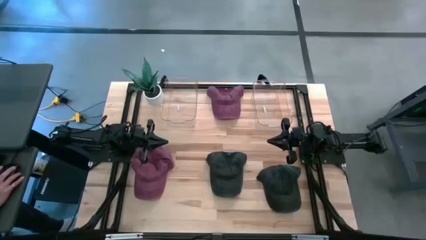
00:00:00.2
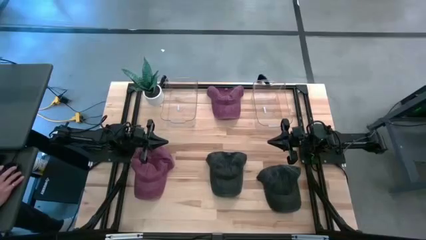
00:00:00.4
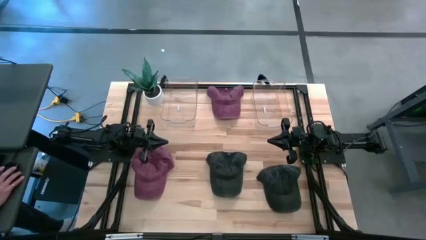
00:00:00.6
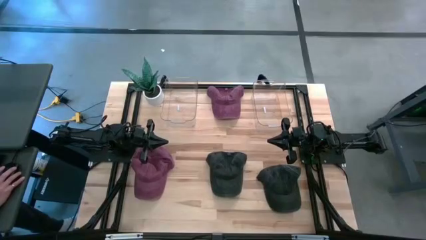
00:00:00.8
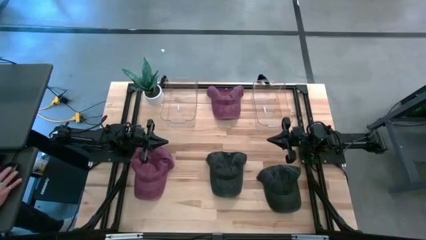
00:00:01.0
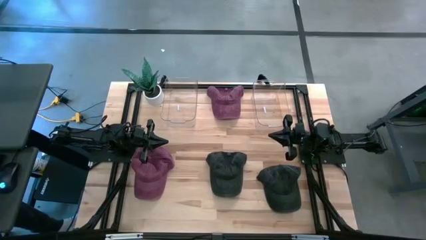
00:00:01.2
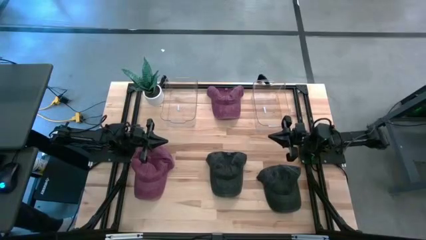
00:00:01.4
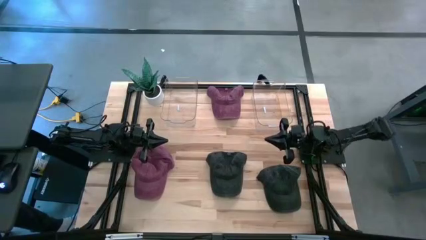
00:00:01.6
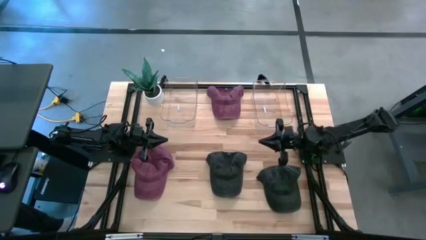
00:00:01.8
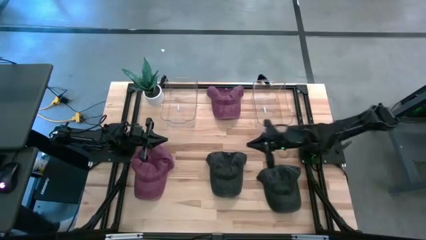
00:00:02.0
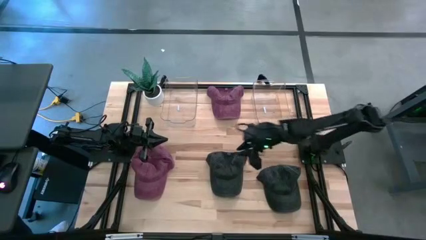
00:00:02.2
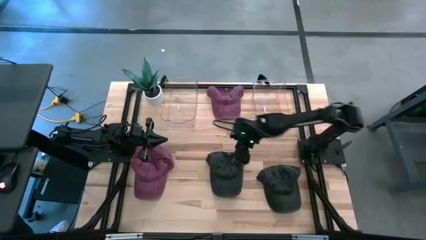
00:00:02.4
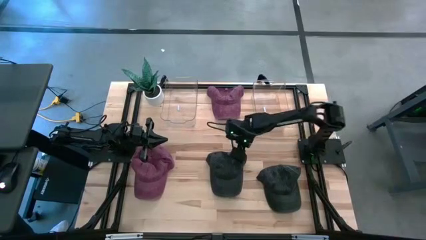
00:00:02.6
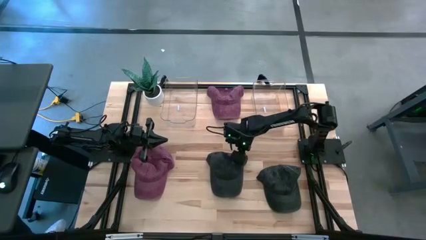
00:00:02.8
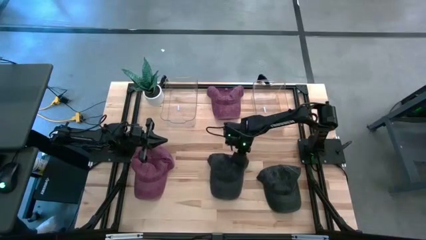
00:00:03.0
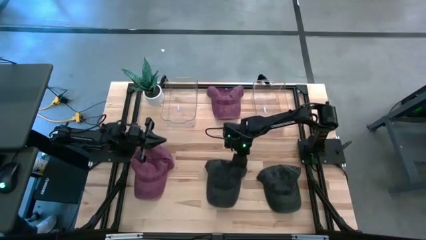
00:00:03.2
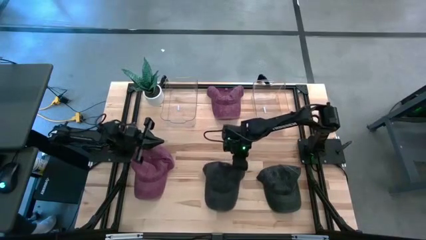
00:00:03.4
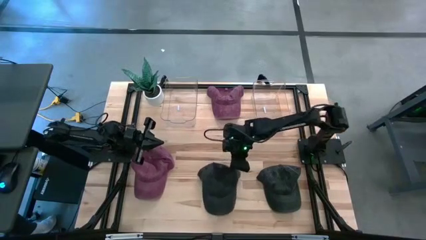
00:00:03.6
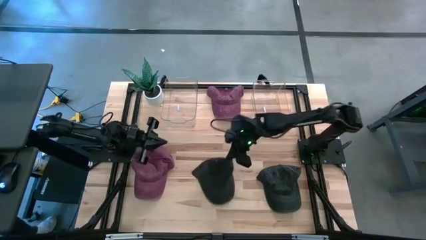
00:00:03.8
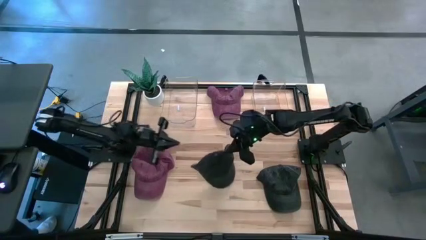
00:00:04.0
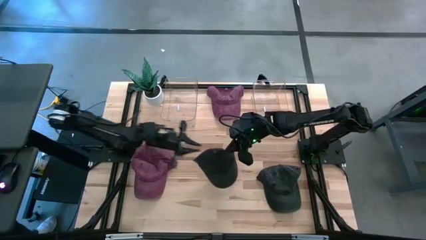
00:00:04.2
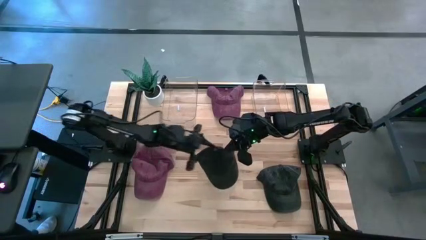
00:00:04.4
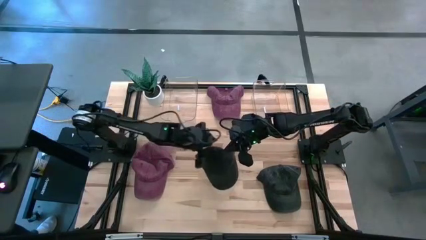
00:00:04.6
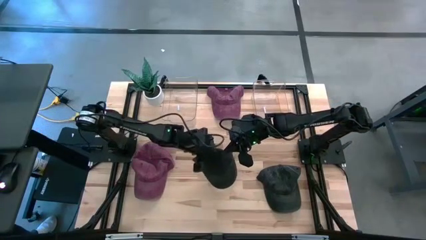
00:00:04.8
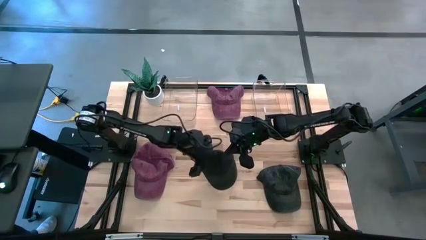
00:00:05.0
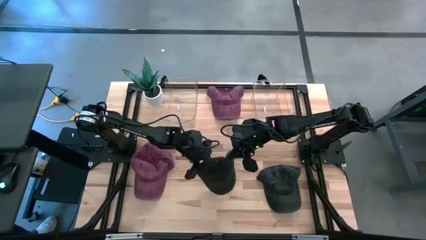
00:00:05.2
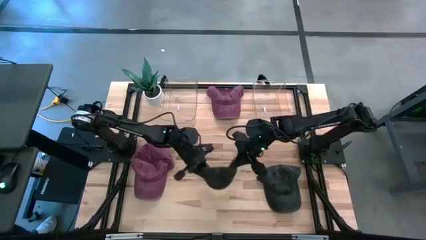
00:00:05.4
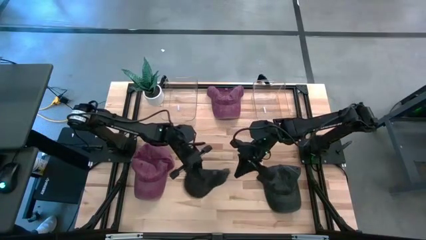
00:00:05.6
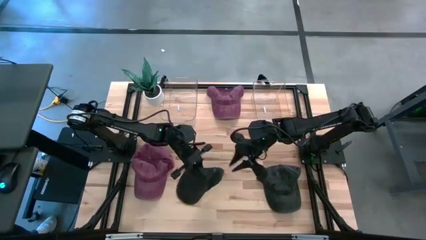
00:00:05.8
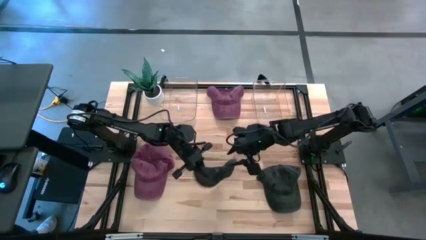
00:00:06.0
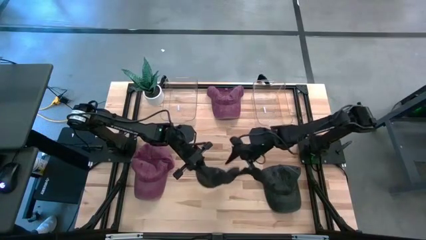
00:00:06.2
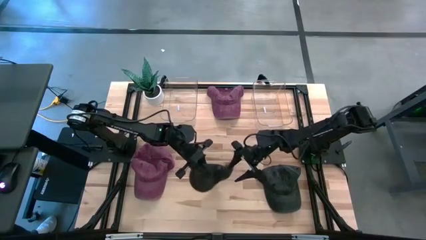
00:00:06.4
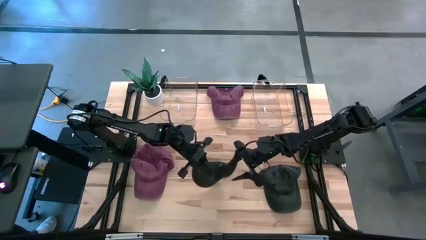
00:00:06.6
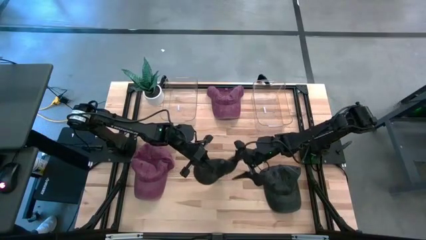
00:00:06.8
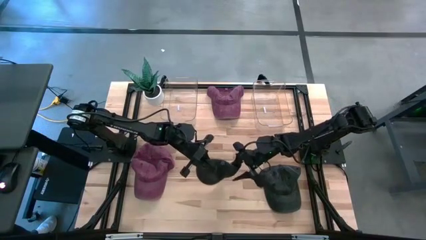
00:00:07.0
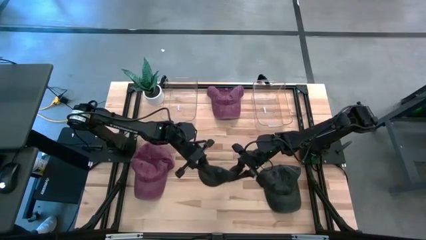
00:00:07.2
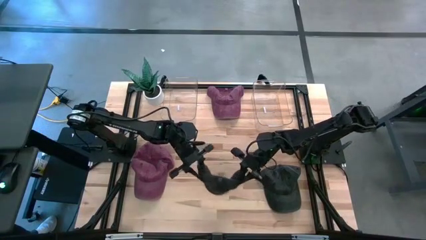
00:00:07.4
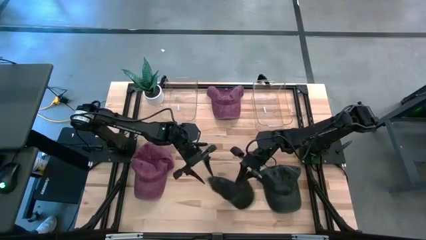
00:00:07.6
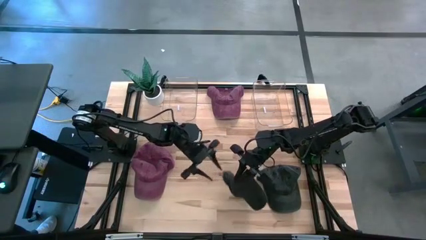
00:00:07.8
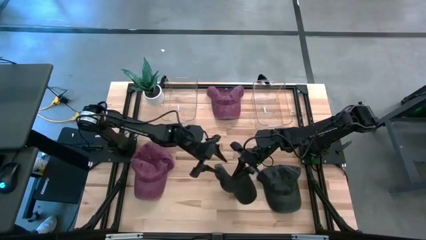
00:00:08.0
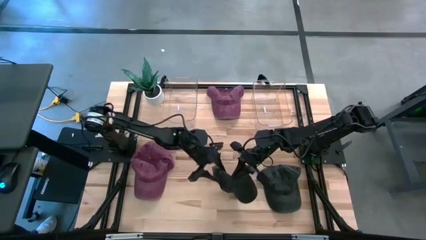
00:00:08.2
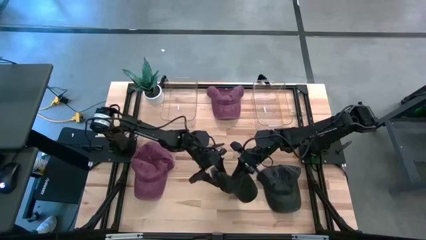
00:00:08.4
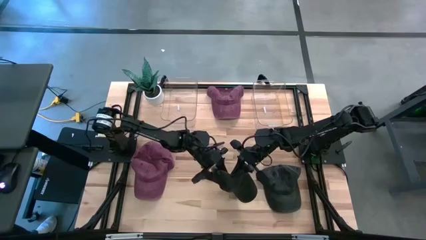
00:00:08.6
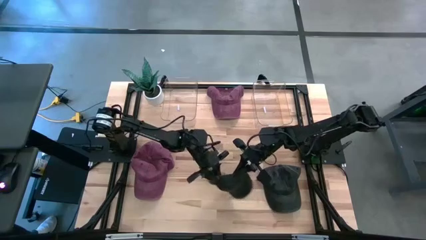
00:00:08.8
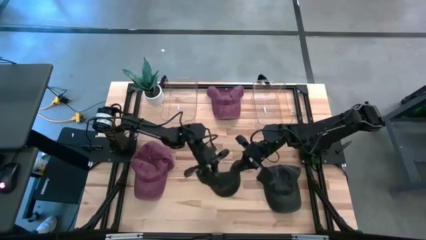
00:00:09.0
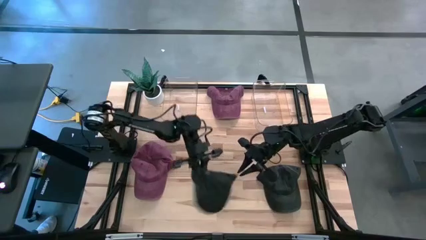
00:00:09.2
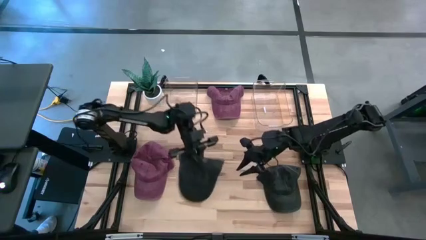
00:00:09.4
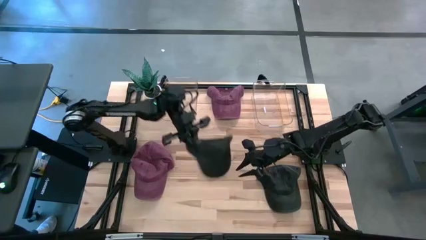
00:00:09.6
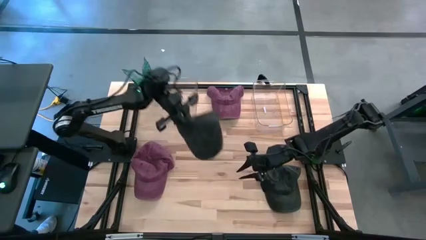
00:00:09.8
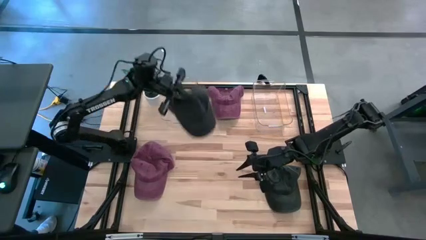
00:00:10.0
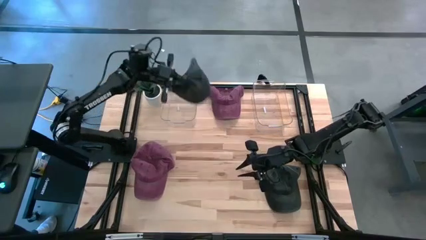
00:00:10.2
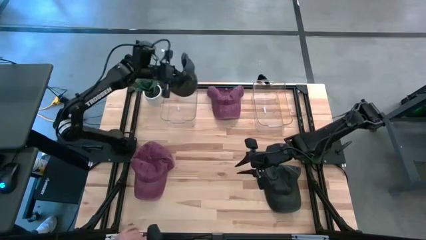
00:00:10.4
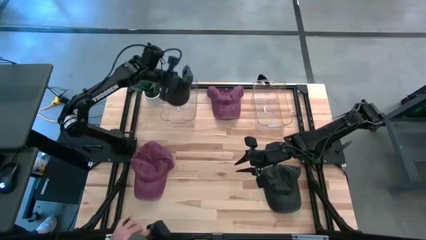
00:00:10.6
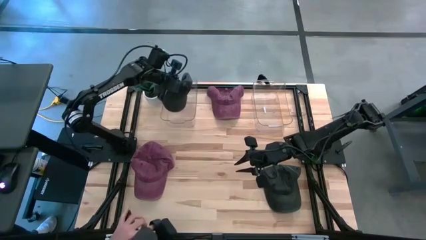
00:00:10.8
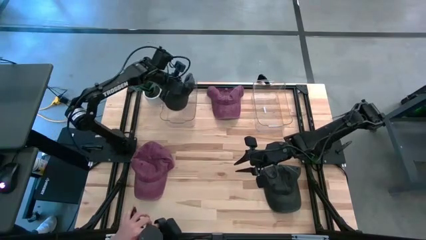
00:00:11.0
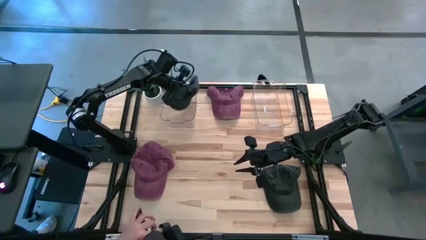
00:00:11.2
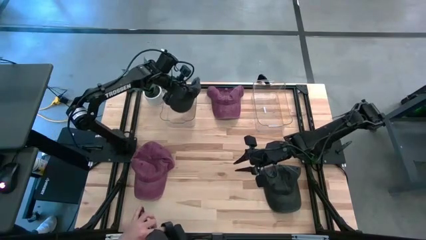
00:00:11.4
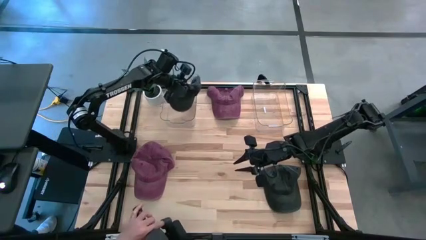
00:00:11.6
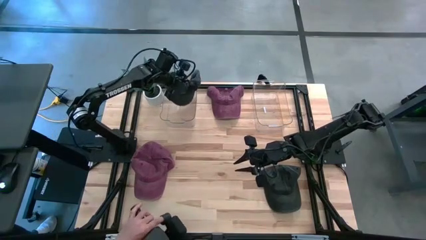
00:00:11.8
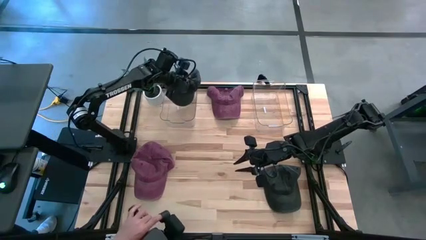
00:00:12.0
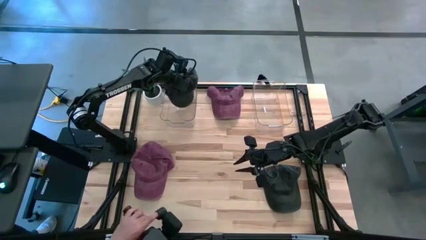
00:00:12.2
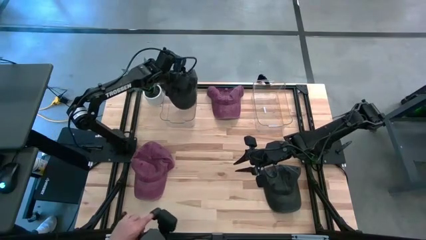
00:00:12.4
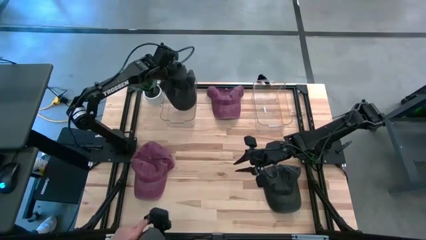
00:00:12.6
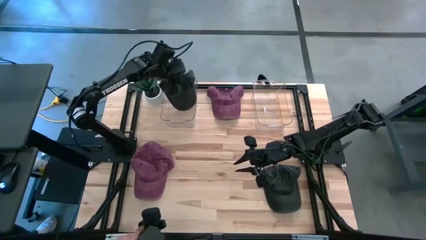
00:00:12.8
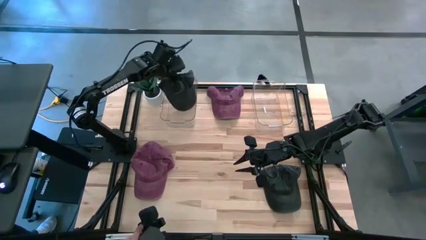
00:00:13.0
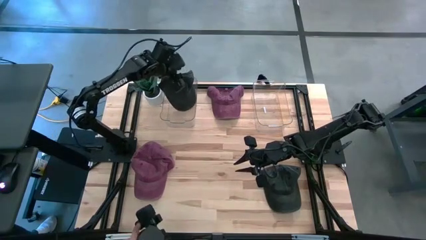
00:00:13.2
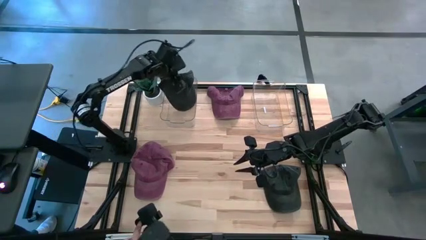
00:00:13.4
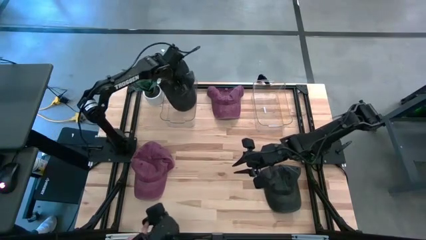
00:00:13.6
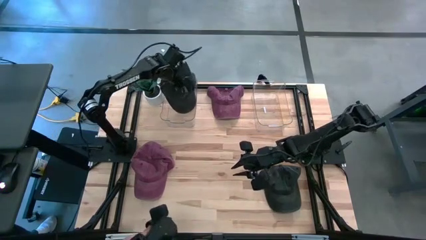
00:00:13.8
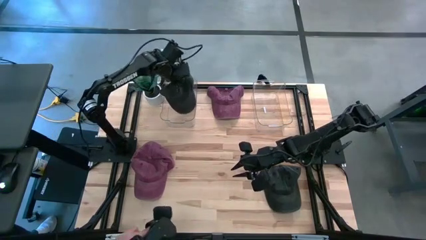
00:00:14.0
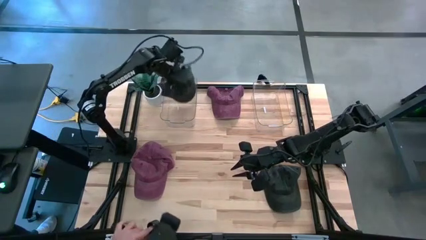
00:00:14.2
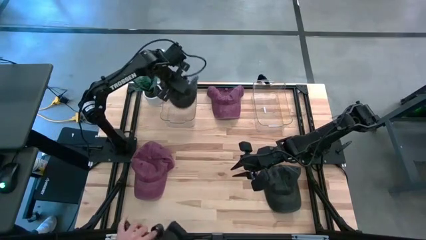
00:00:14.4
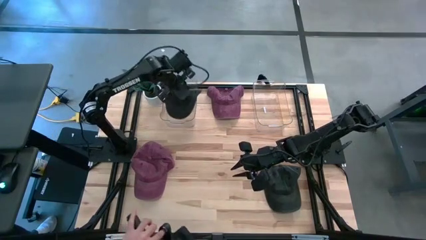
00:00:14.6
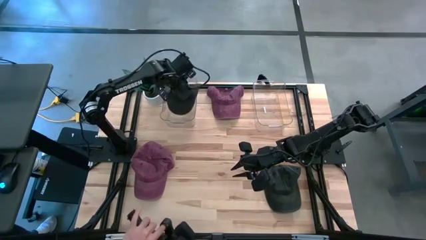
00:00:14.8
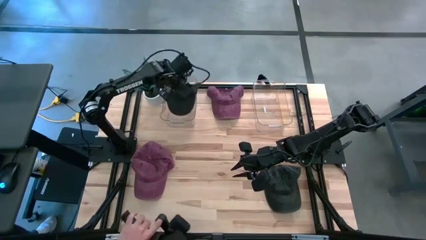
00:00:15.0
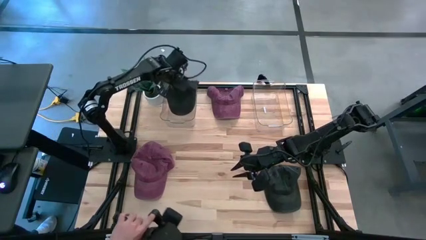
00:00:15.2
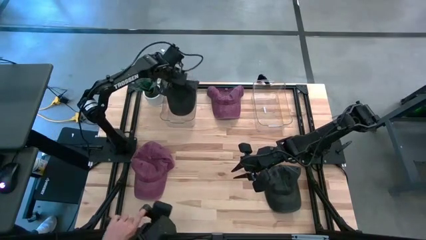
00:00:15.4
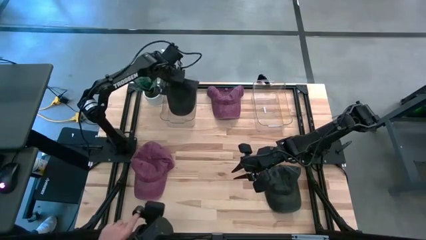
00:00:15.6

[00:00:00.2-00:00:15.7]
Task: Pick & Place hat
Put the left black cap into the left transparent bin
